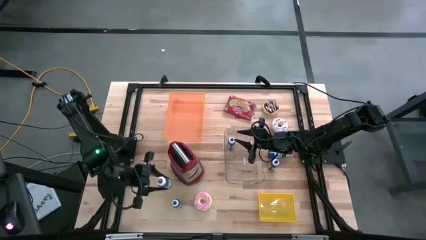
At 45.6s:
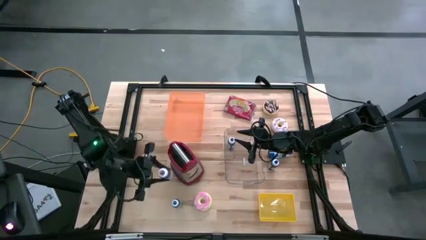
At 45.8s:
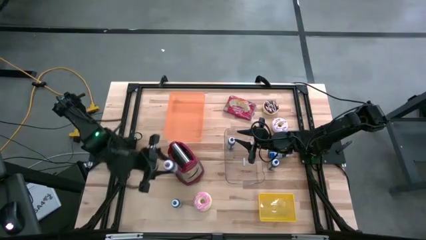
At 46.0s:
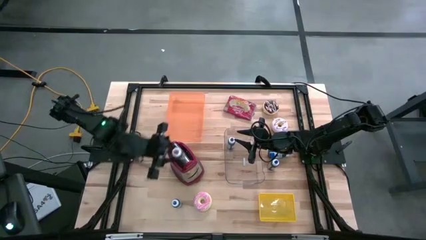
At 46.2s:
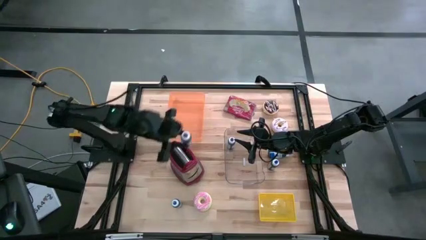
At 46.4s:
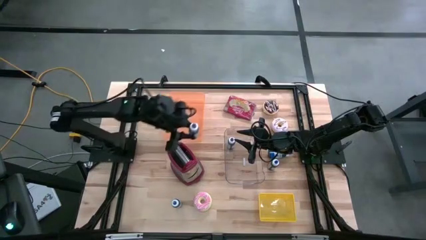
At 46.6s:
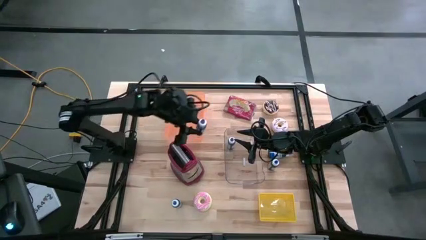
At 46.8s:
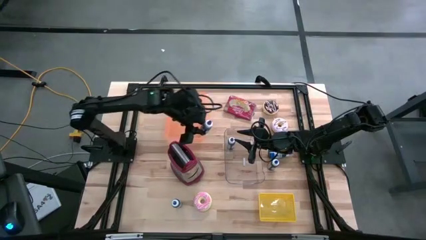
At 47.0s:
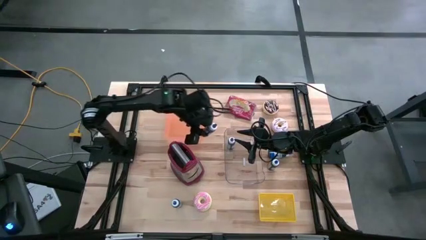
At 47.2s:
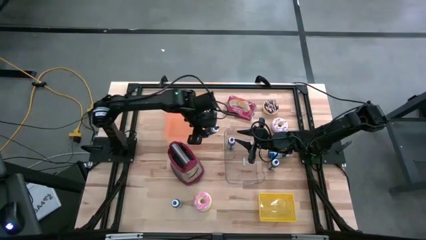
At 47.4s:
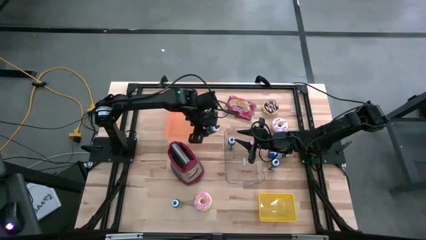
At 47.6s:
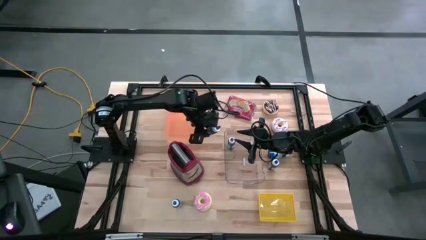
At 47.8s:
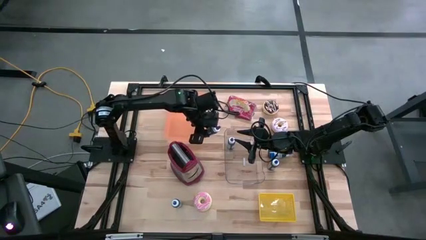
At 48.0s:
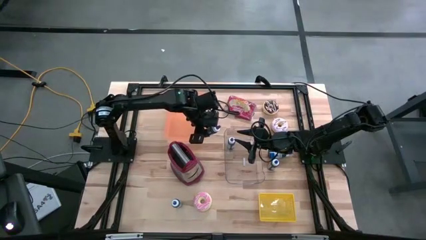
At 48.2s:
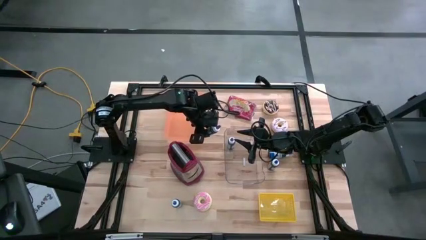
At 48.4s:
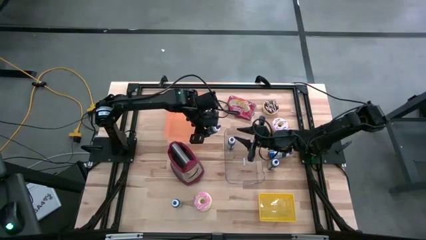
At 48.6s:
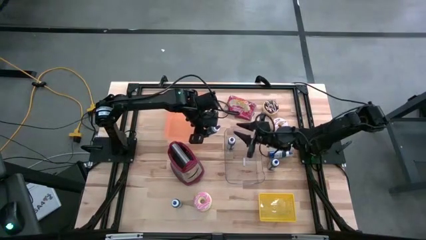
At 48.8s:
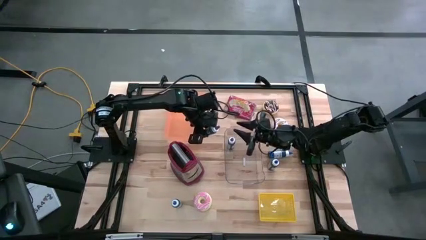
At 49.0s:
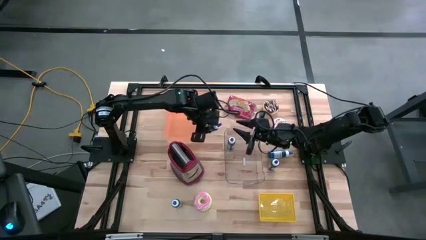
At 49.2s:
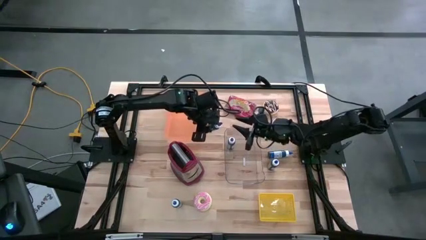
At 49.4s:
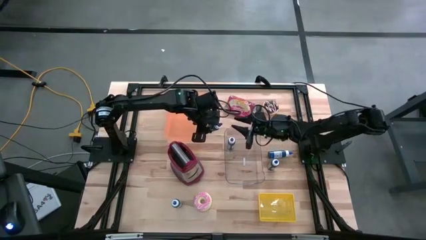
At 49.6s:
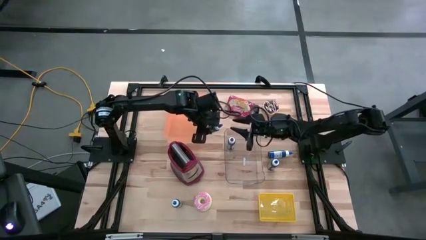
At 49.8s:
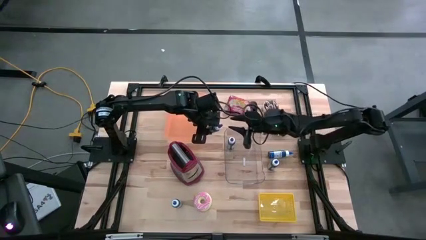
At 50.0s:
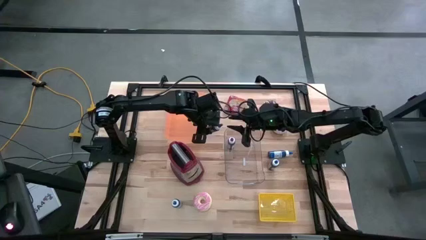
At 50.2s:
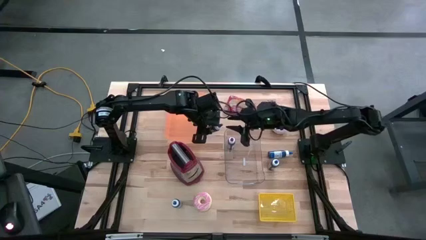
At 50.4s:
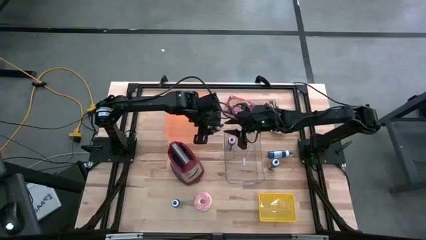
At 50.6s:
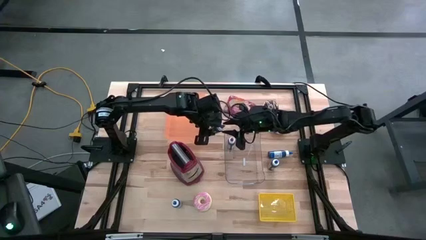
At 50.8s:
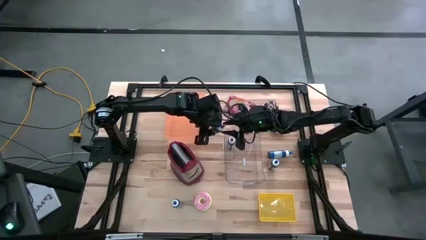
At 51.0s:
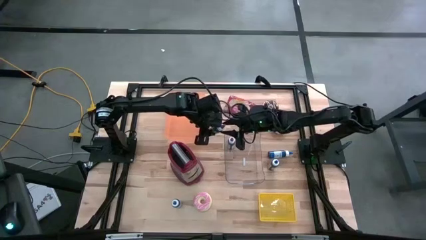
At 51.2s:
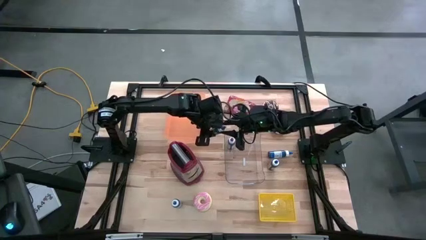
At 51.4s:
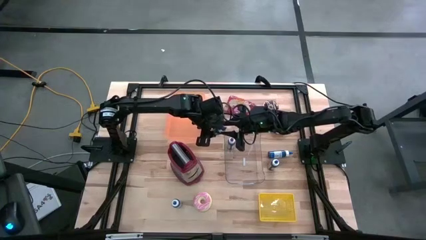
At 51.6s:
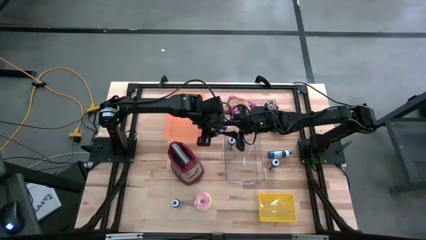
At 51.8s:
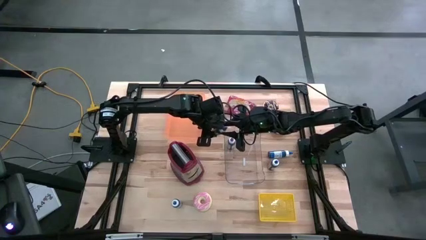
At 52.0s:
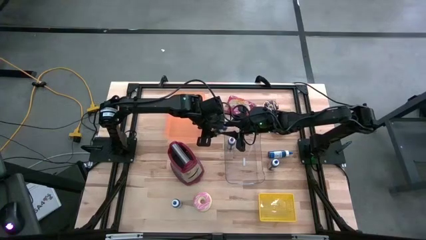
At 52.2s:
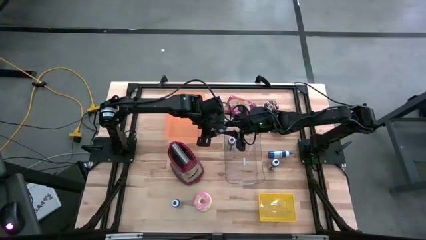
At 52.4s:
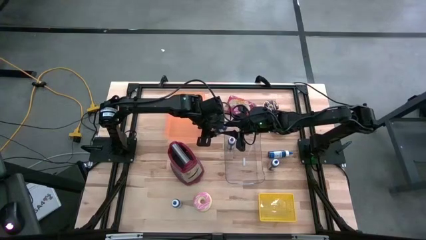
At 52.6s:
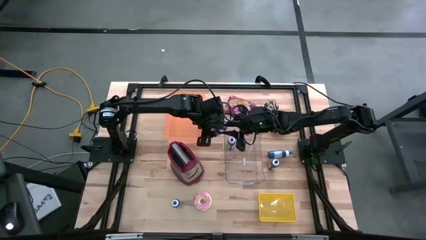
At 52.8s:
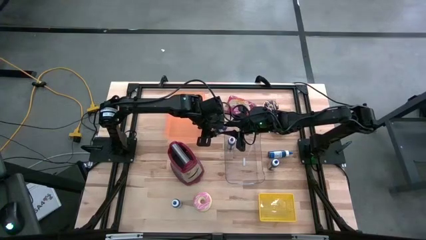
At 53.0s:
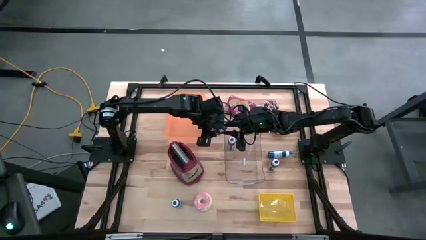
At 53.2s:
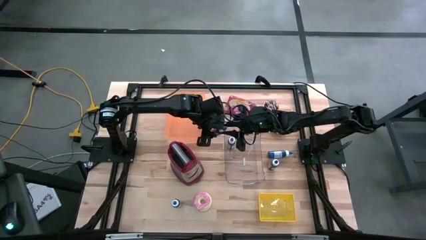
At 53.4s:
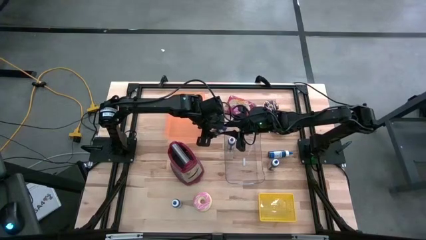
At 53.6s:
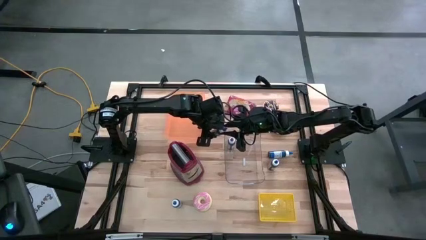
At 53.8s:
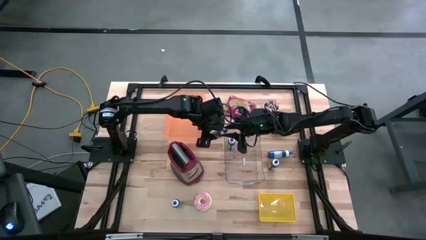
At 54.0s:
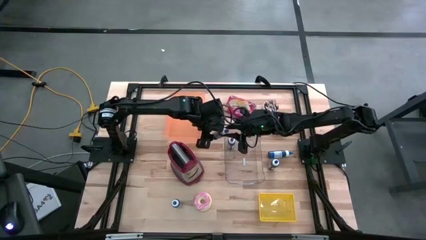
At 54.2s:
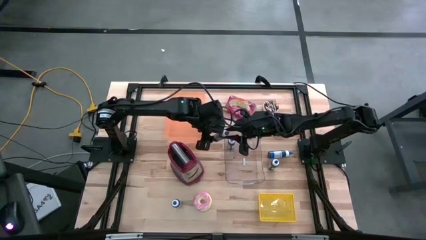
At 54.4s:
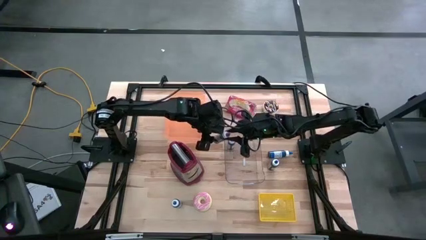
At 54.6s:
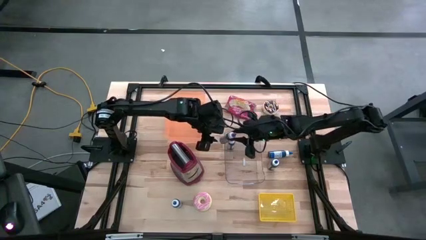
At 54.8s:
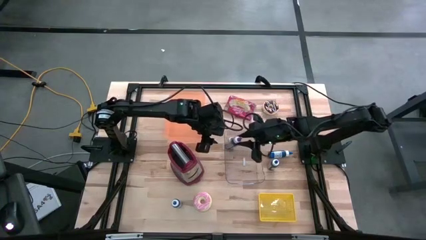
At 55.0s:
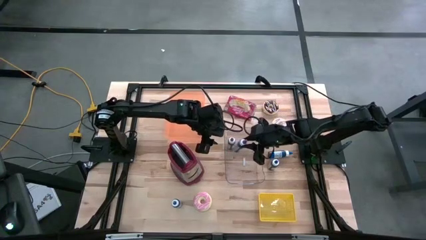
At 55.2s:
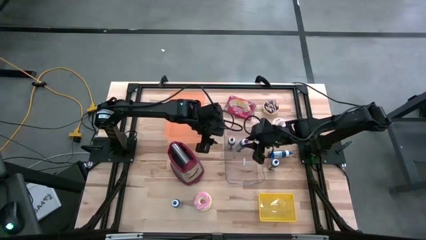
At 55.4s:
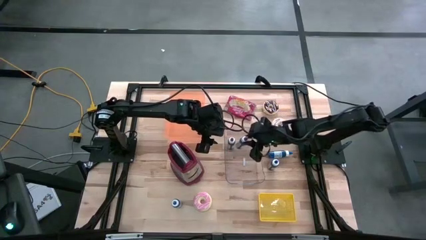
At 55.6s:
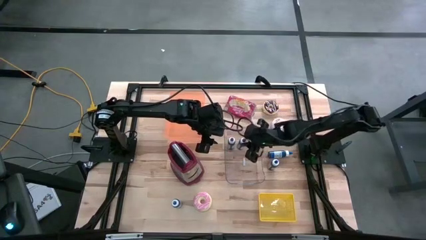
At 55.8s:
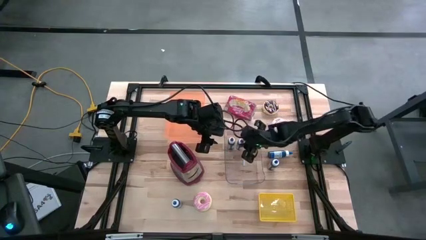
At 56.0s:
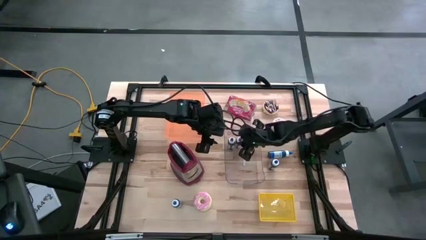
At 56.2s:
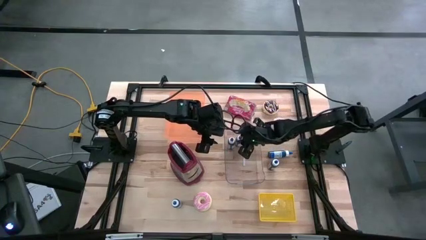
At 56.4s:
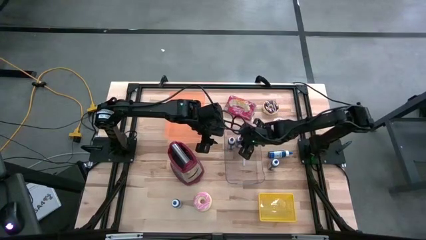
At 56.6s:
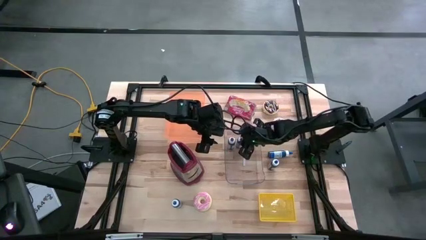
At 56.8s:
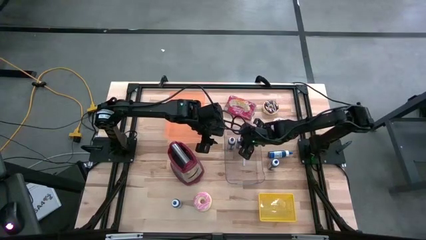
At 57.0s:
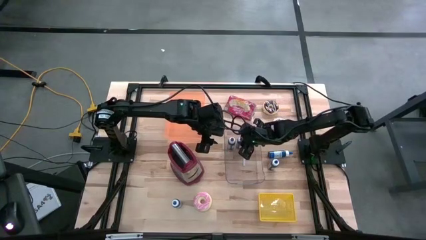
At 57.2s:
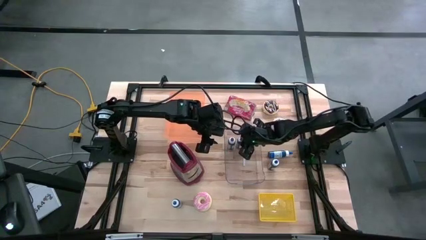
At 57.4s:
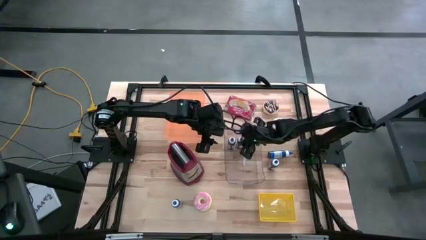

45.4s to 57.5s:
Task: Pick & Place Food Item
Put the purple food coloring bottle into the transparent bin
